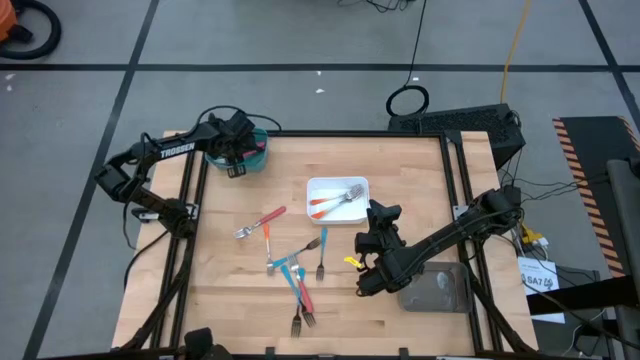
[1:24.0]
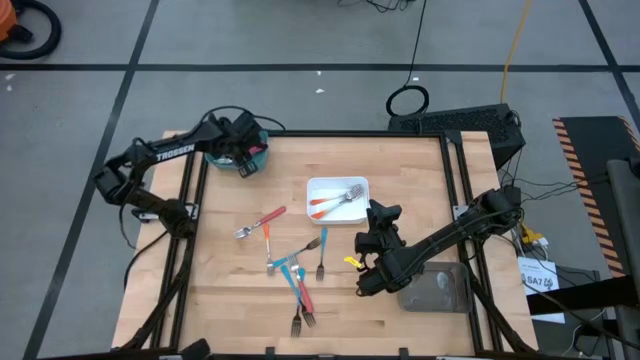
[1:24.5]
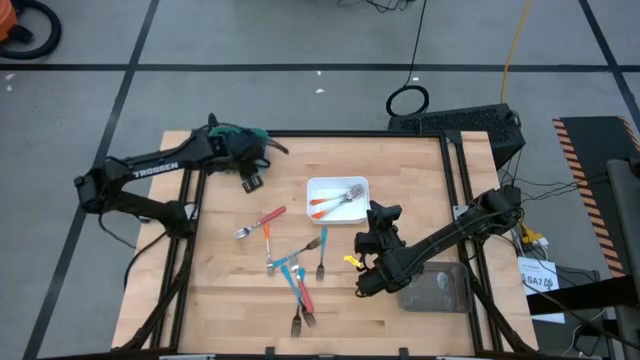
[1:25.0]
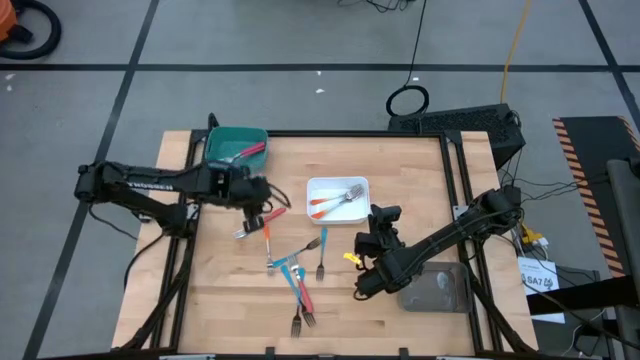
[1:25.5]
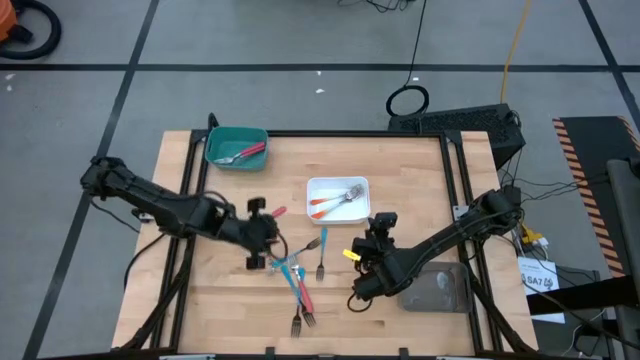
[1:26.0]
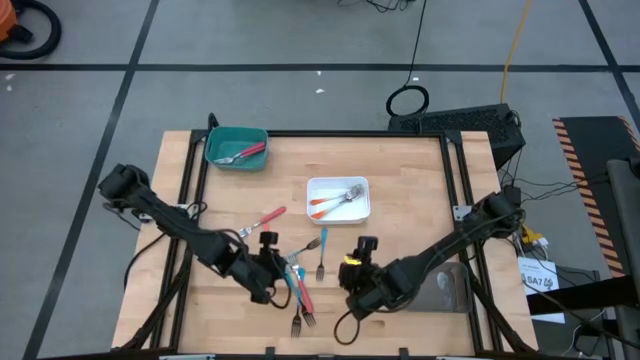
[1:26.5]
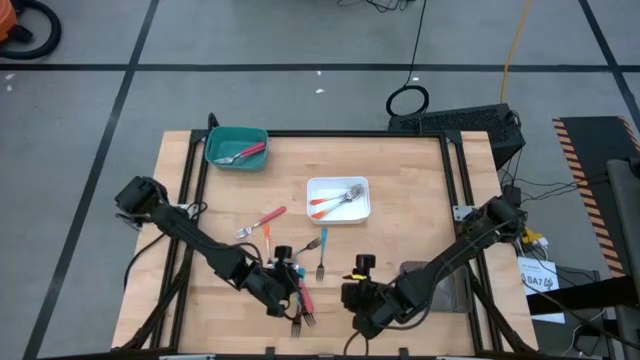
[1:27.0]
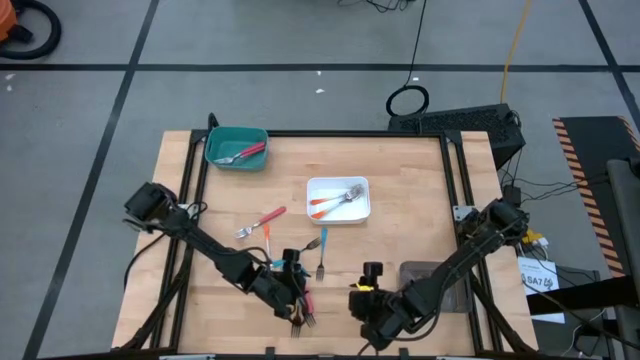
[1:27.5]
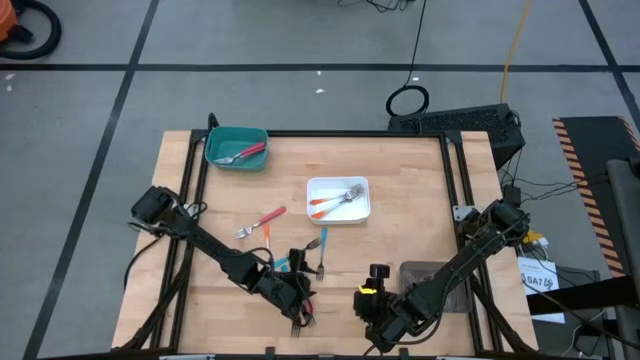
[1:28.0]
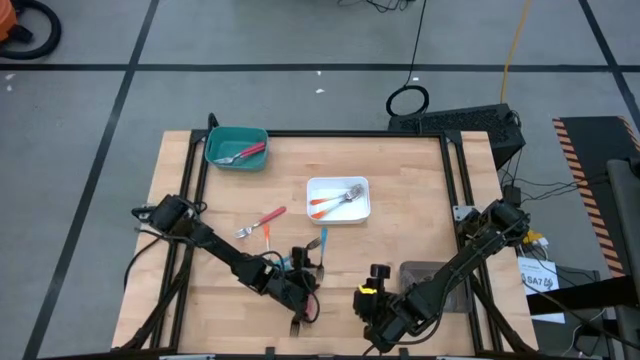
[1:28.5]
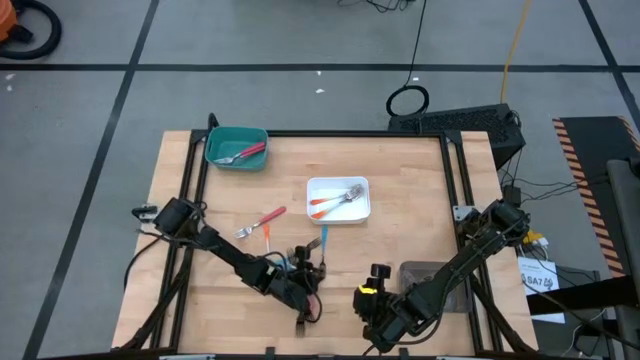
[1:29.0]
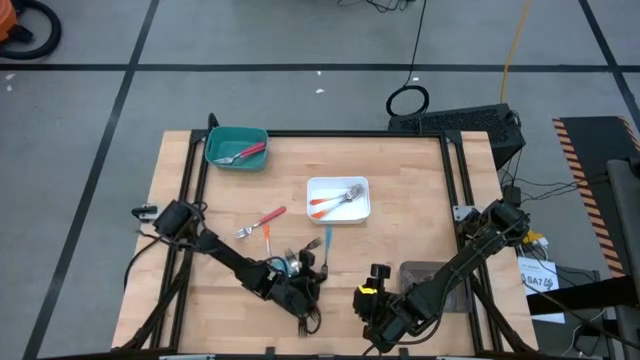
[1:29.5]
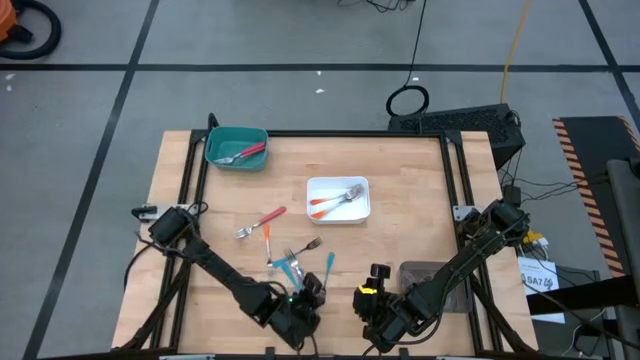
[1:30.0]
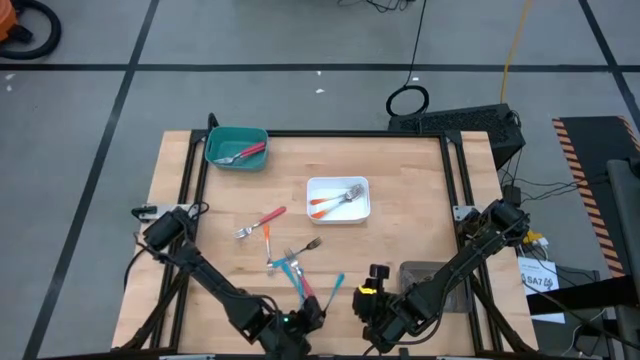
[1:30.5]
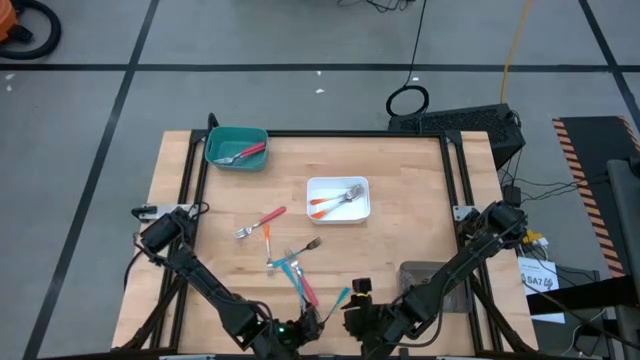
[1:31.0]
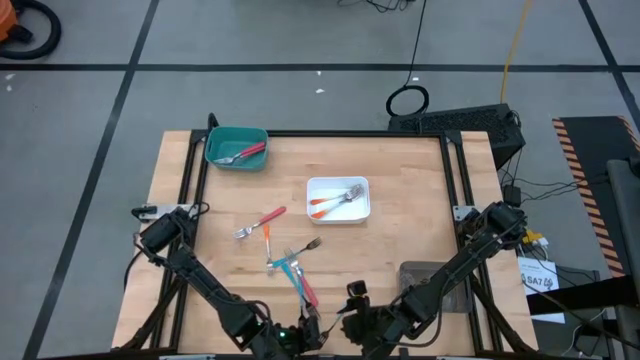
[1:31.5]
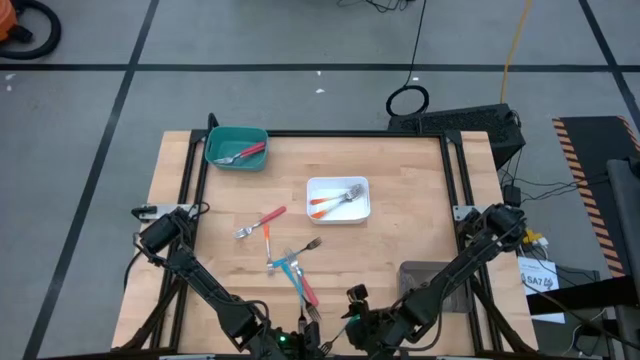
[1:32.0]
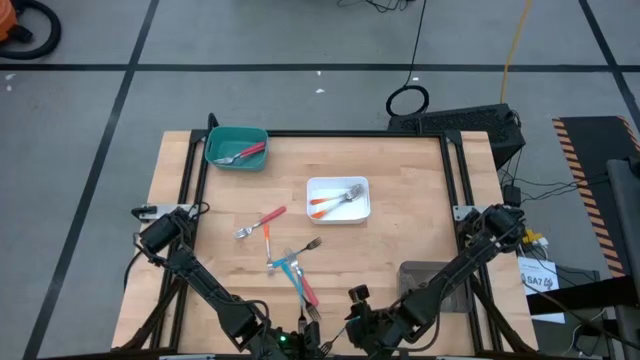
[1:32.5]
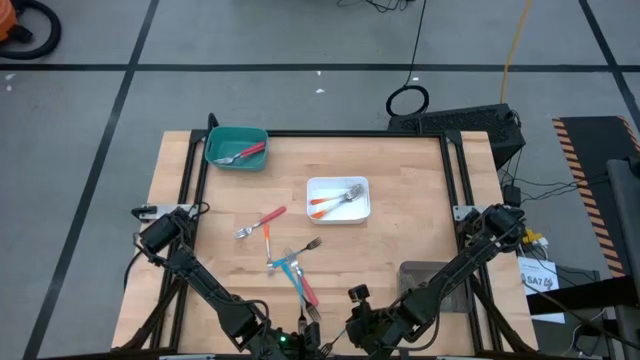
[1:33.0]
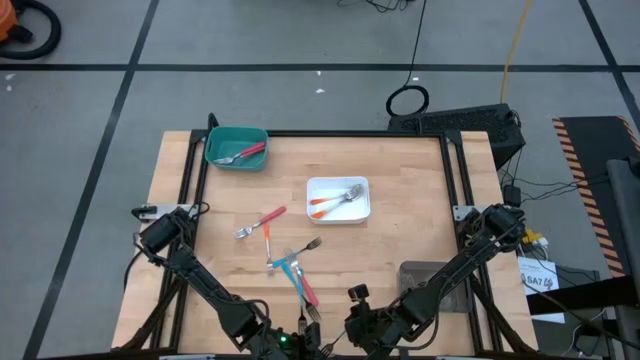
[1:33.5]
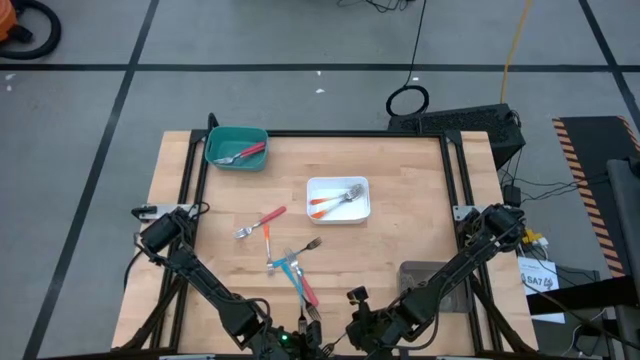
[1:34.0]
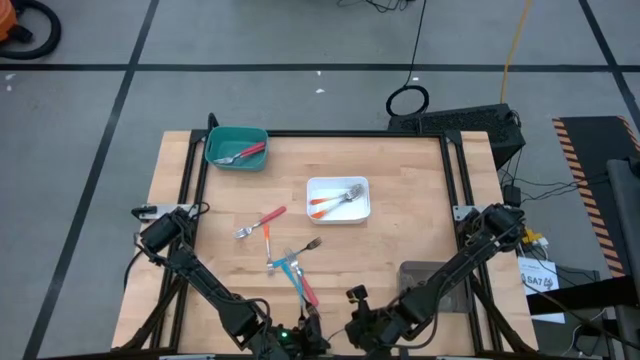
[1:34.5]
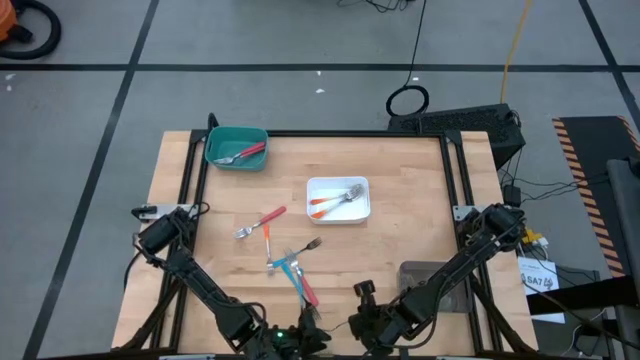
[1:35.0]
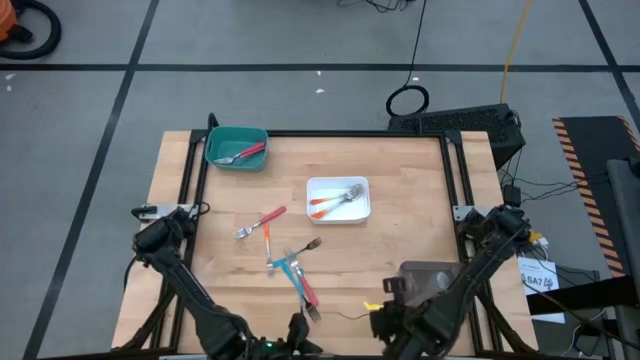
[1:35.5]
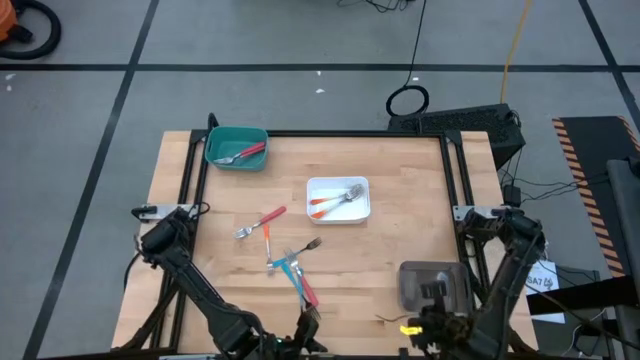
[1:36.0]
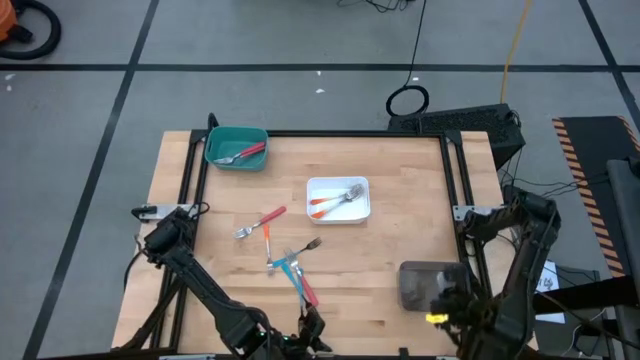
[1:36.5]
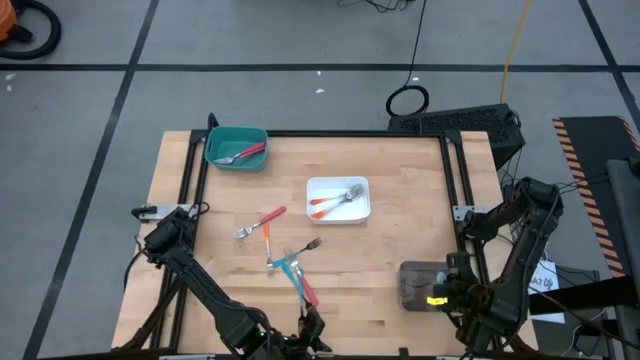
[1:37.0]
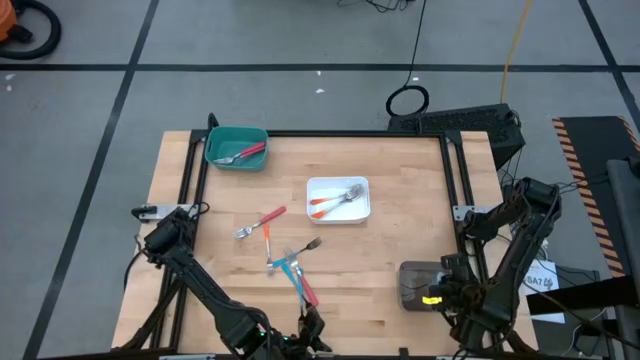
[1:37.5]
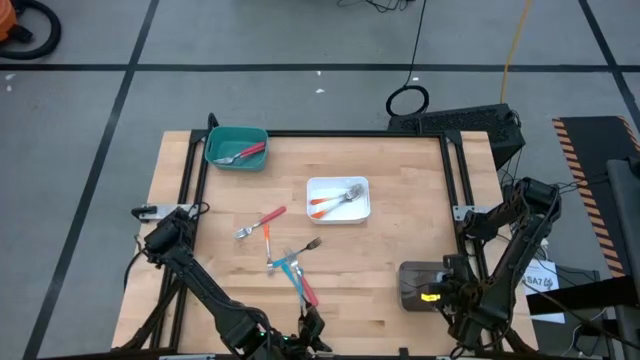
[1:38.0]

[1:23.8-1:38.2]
Task: Sort silverware by color (type)
Put the blue fork into the black bin

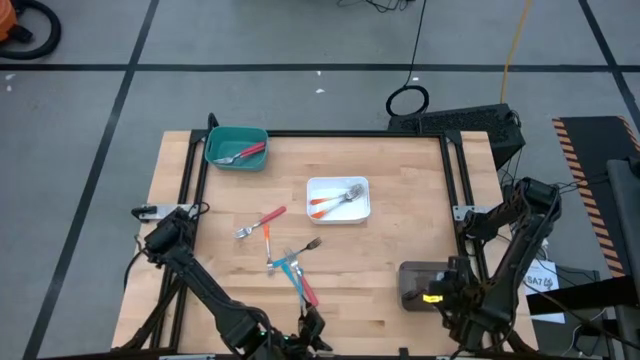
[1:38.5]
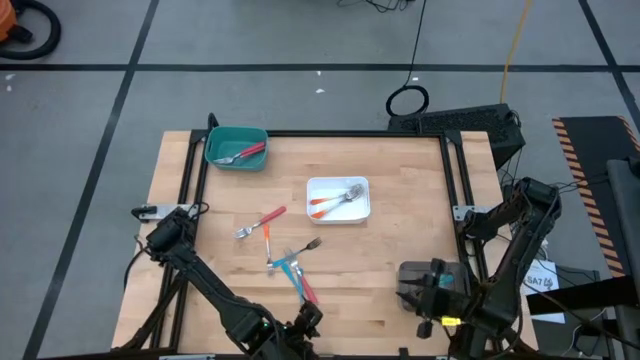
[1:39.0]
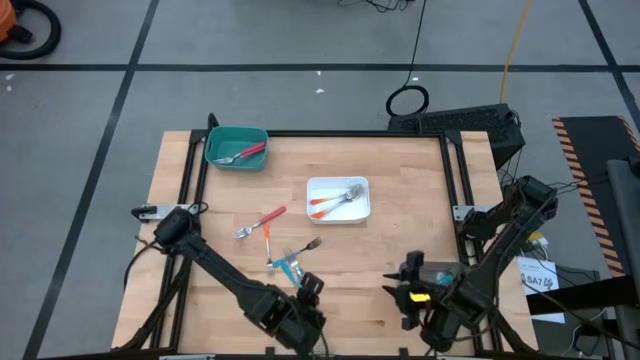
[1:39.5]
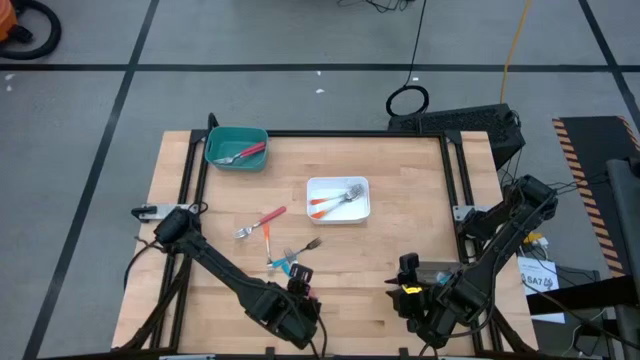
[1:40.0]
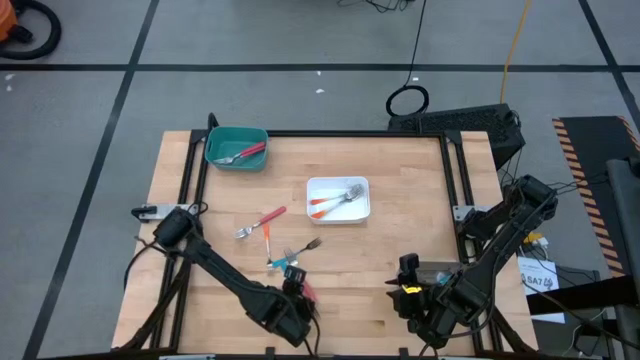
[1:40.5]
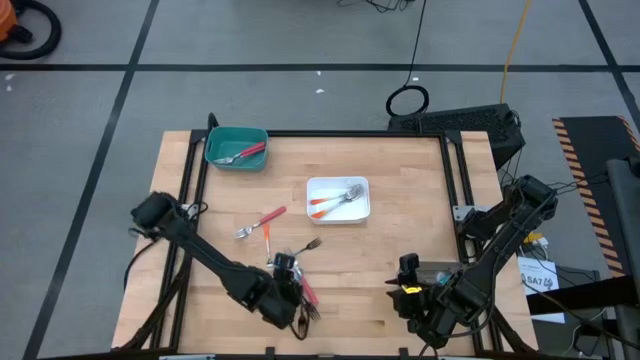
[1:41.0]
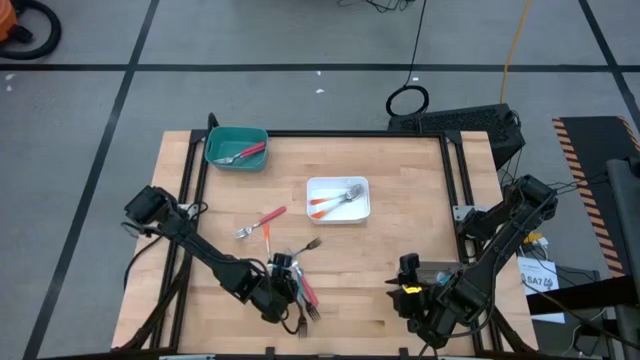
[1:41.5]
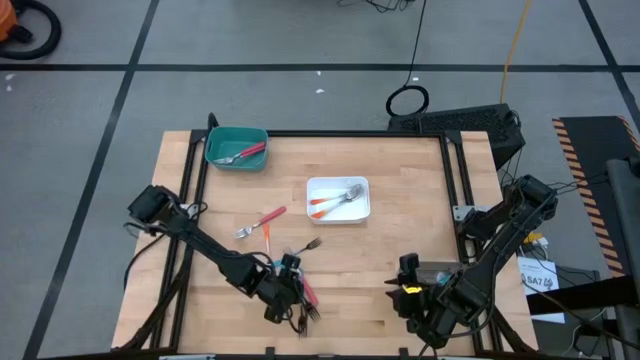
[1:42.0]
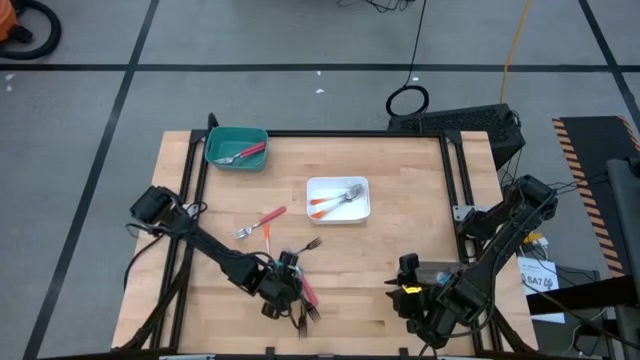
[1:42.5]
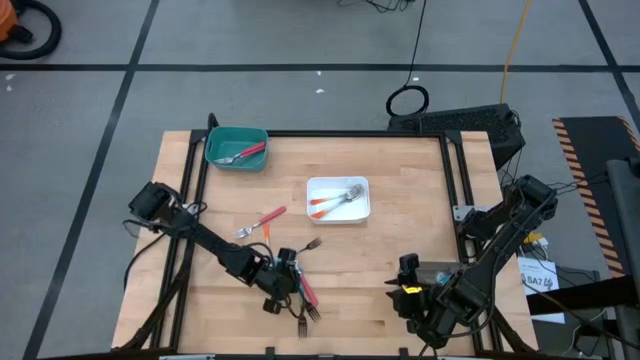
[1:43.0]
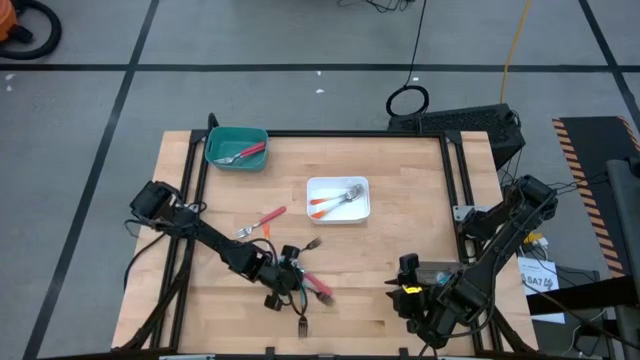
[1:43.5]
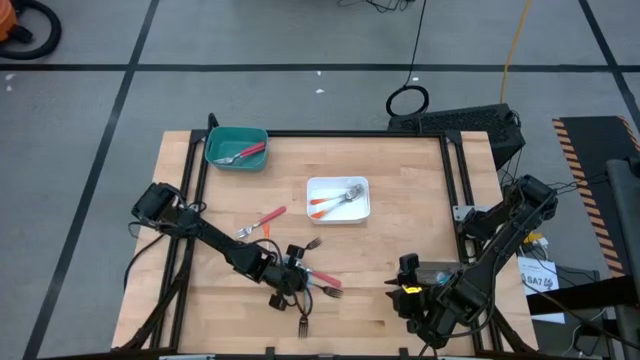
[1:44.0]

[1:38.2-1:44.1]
Put the blue fork into the black bin

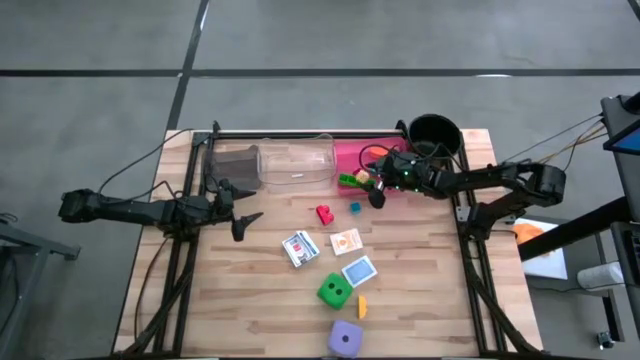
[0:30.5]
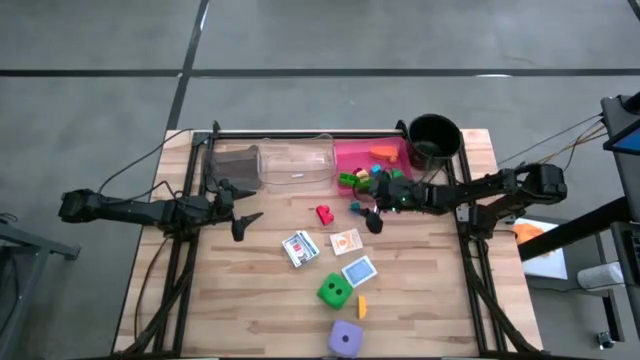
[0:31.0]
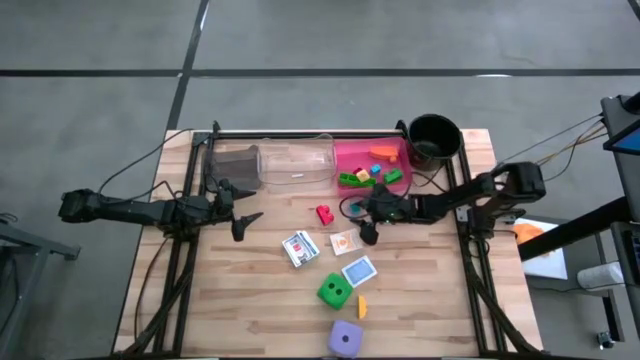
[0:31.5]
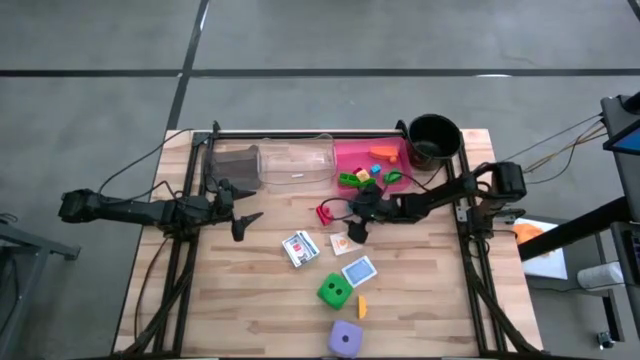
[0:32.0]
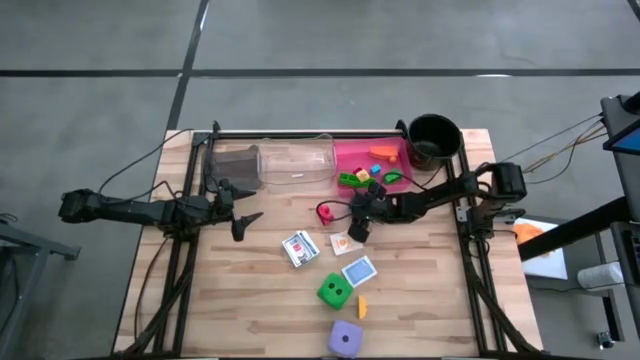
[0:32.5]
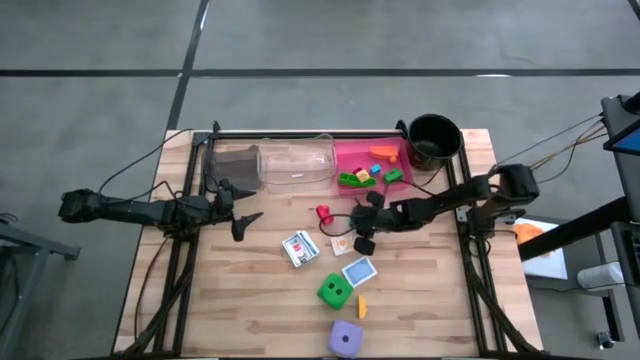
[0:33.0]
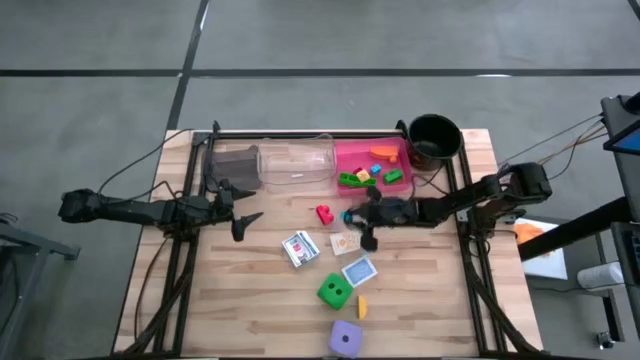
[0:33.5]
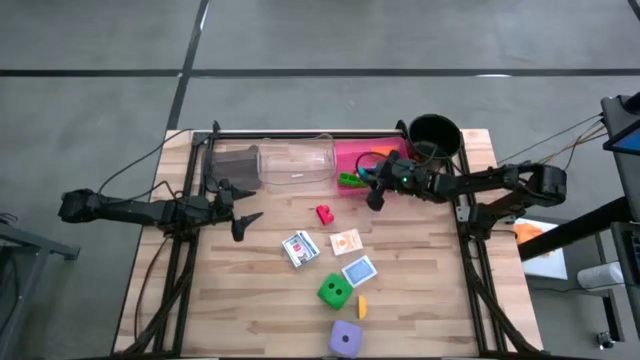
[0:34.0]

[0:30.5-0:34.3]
Task: Pick & Place Toys
Put the blue game piece into the pink bin
